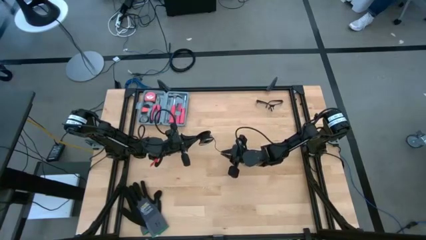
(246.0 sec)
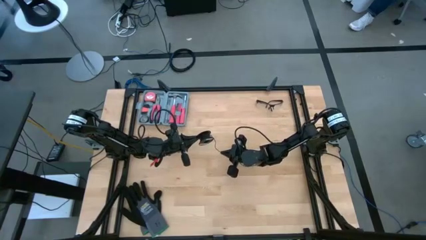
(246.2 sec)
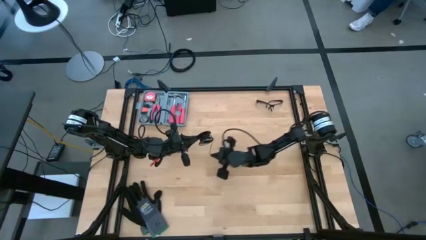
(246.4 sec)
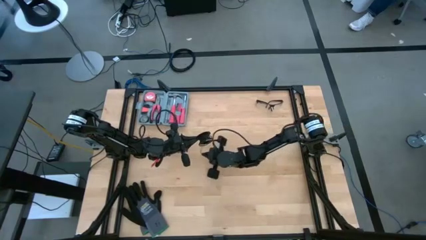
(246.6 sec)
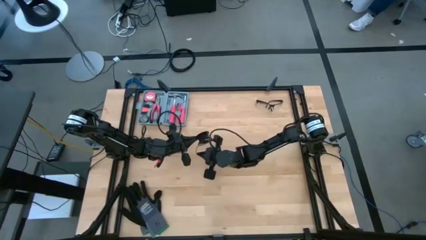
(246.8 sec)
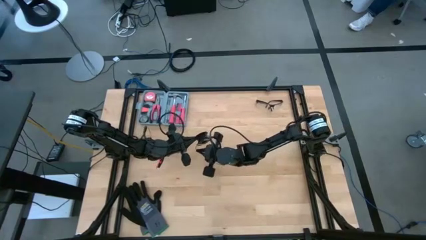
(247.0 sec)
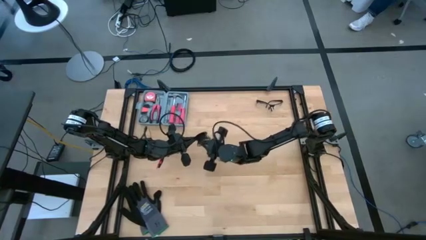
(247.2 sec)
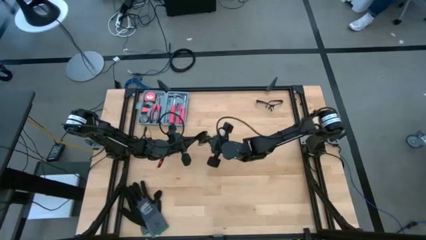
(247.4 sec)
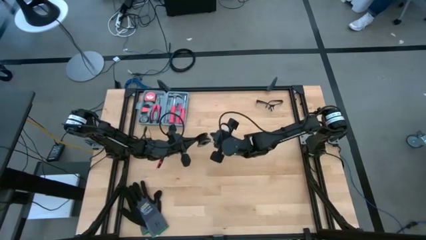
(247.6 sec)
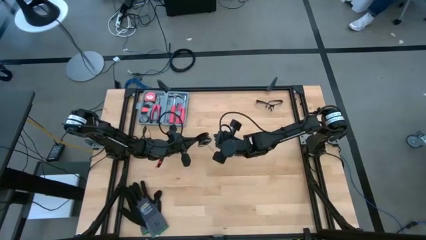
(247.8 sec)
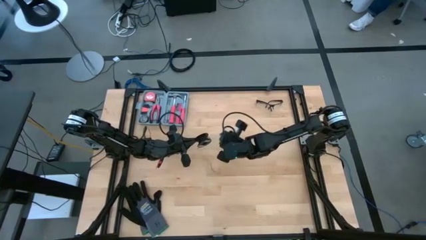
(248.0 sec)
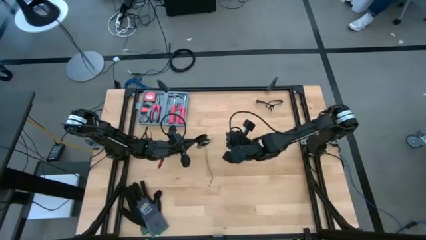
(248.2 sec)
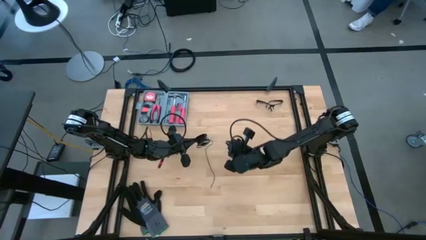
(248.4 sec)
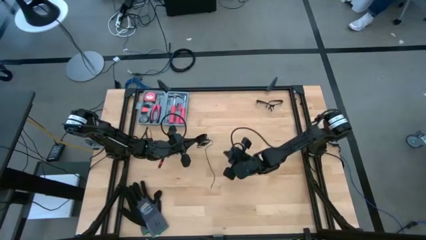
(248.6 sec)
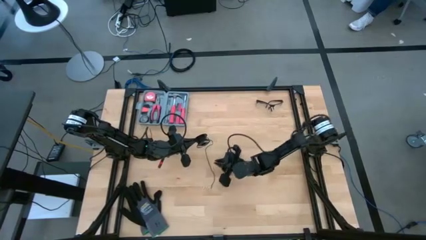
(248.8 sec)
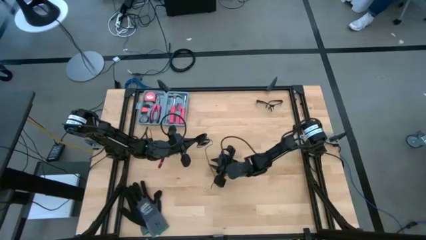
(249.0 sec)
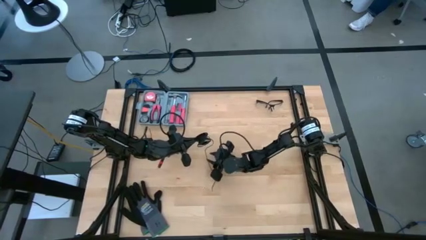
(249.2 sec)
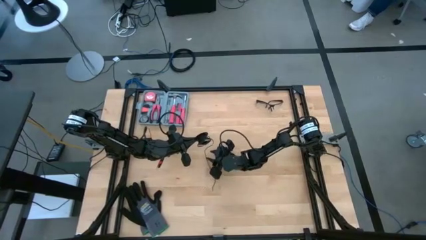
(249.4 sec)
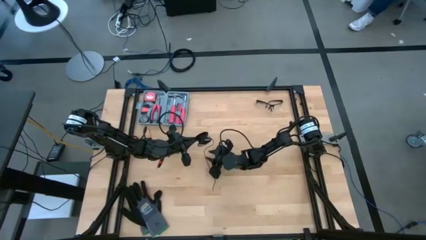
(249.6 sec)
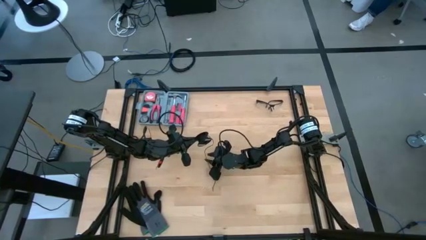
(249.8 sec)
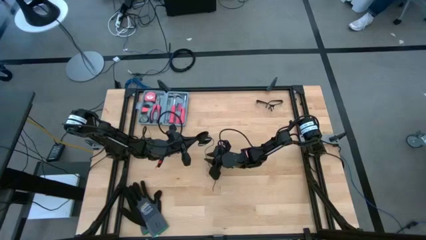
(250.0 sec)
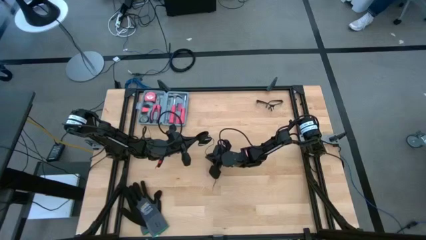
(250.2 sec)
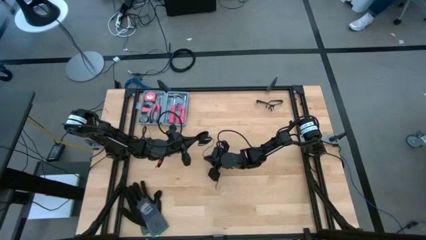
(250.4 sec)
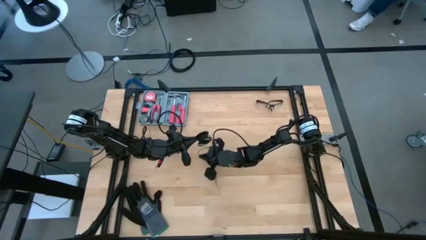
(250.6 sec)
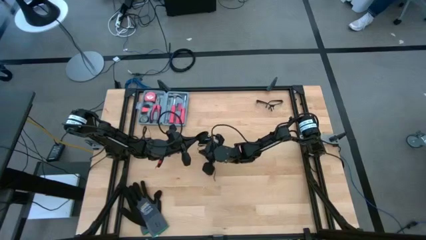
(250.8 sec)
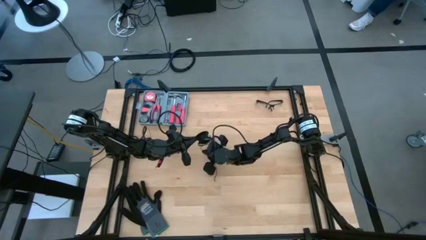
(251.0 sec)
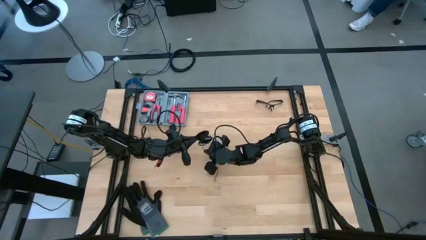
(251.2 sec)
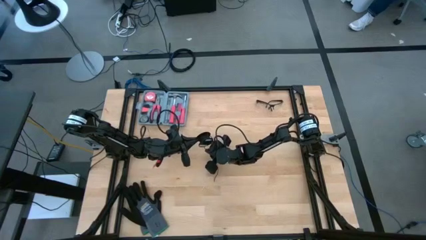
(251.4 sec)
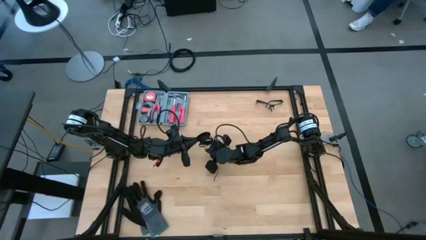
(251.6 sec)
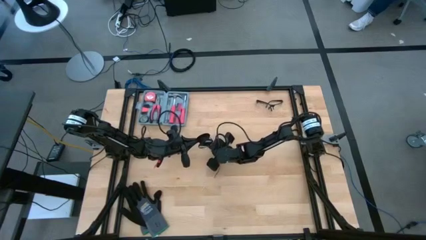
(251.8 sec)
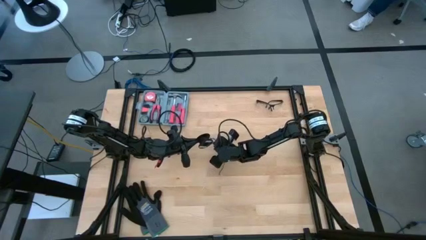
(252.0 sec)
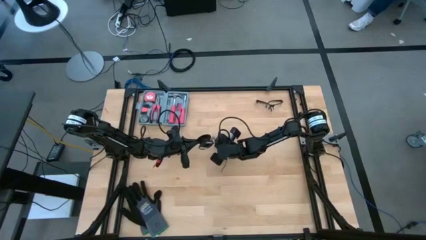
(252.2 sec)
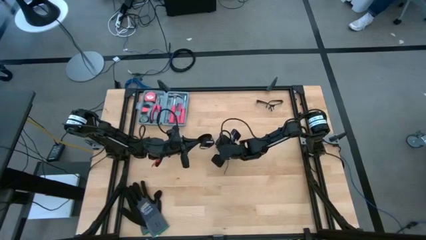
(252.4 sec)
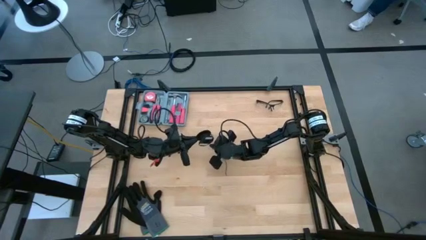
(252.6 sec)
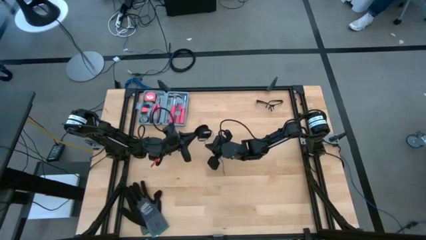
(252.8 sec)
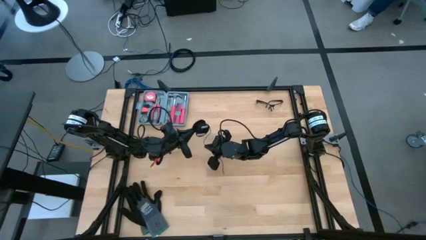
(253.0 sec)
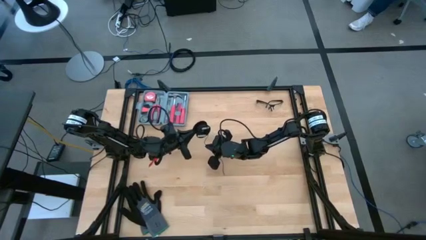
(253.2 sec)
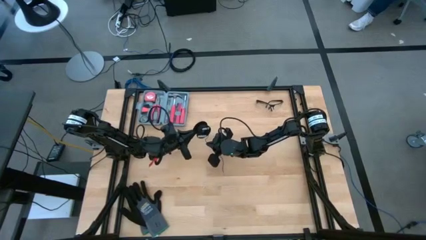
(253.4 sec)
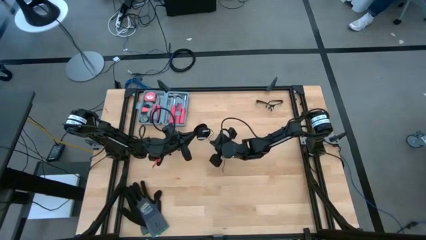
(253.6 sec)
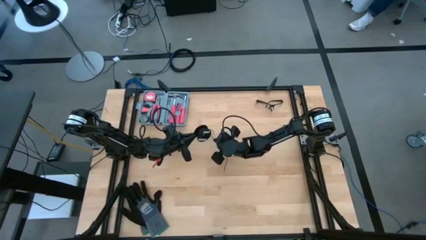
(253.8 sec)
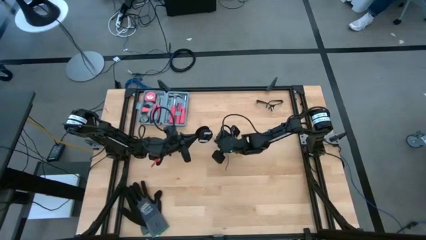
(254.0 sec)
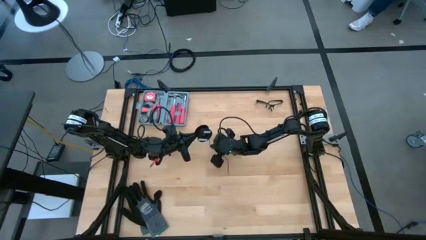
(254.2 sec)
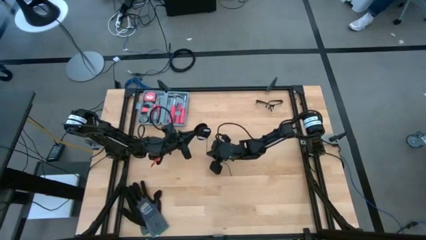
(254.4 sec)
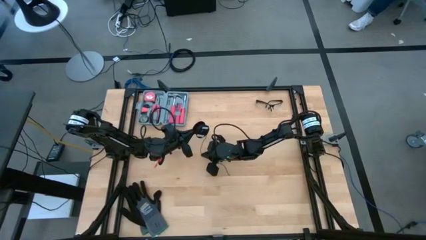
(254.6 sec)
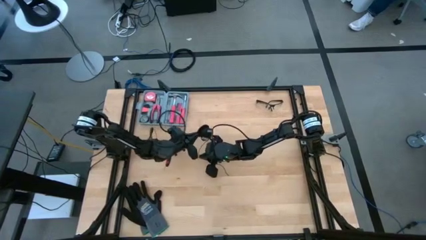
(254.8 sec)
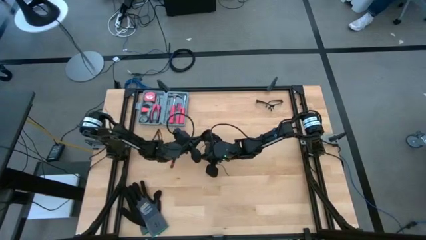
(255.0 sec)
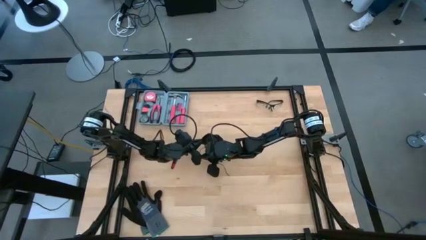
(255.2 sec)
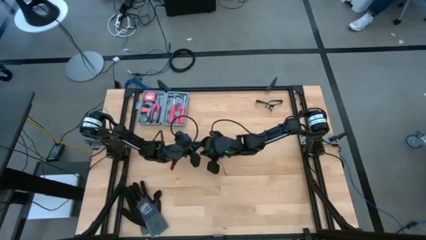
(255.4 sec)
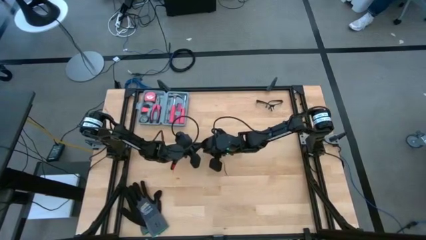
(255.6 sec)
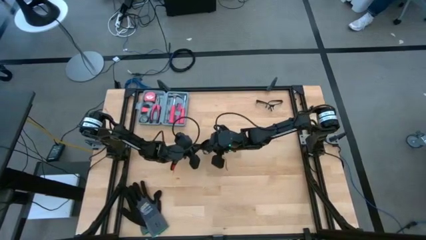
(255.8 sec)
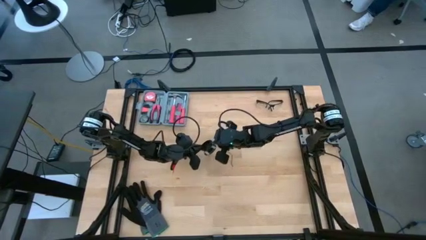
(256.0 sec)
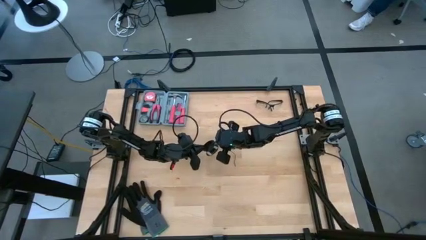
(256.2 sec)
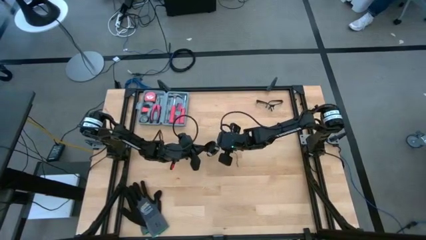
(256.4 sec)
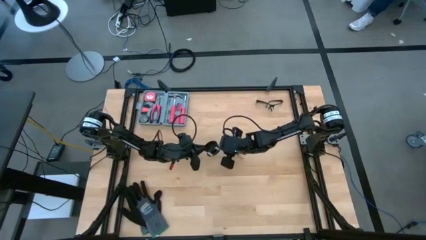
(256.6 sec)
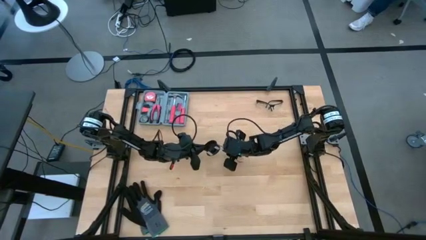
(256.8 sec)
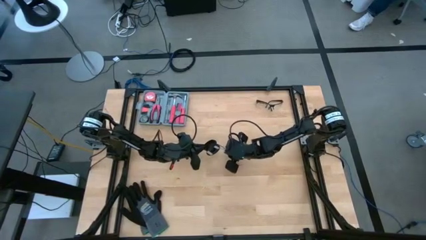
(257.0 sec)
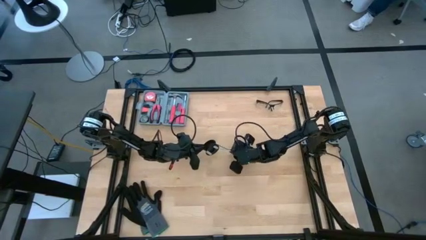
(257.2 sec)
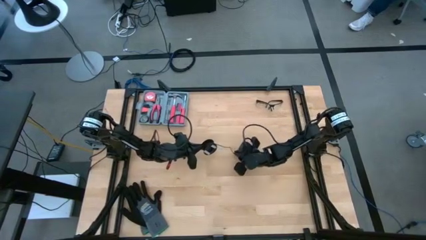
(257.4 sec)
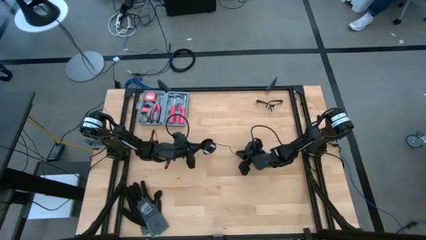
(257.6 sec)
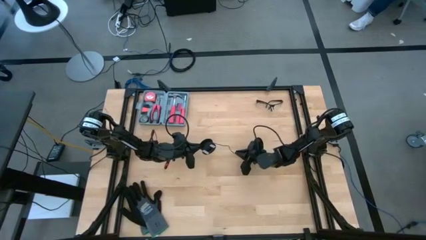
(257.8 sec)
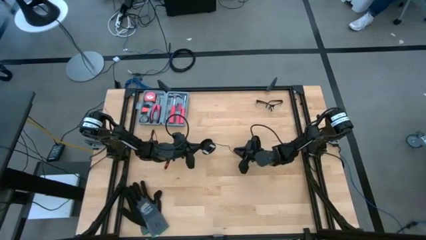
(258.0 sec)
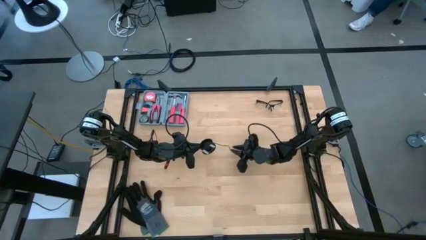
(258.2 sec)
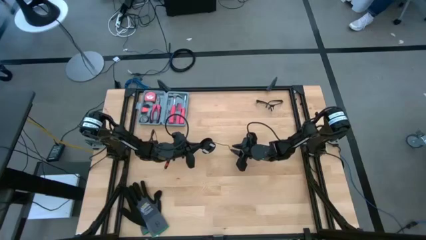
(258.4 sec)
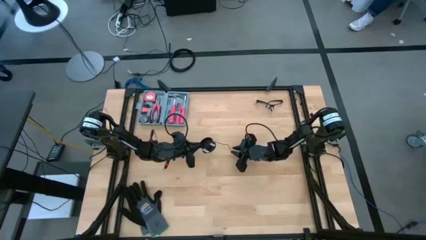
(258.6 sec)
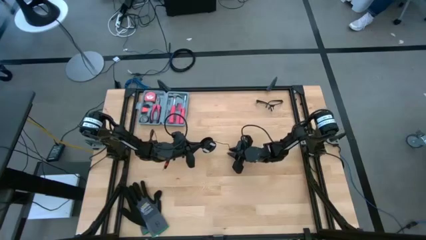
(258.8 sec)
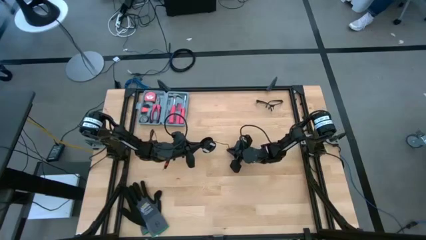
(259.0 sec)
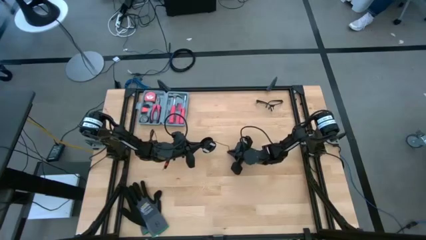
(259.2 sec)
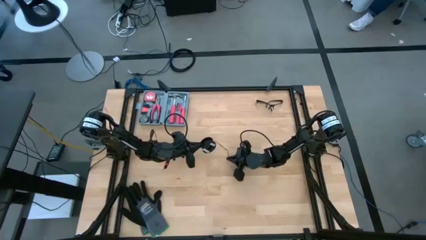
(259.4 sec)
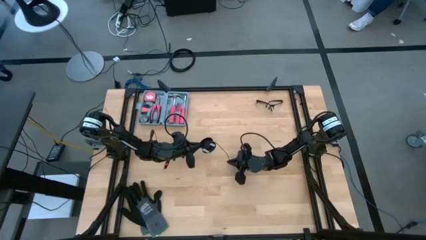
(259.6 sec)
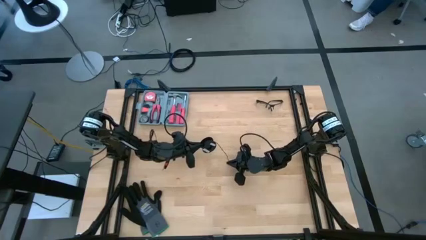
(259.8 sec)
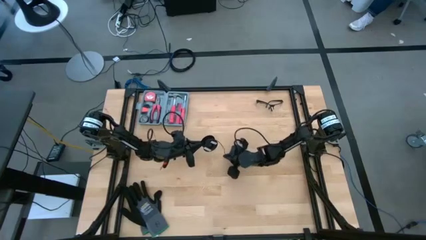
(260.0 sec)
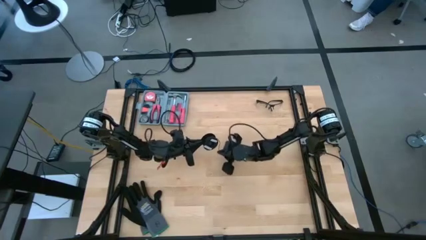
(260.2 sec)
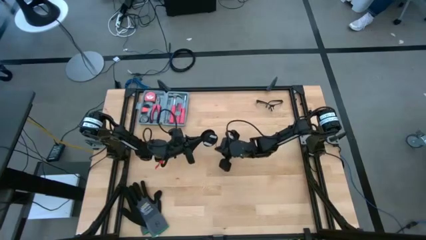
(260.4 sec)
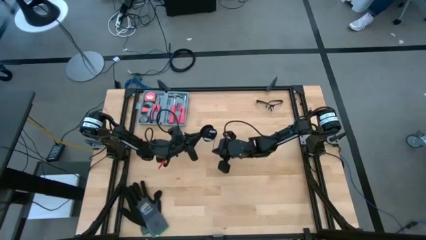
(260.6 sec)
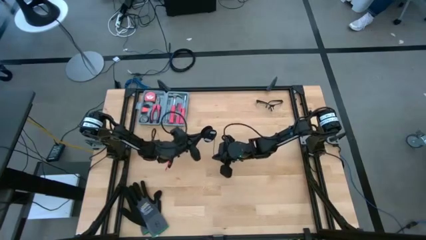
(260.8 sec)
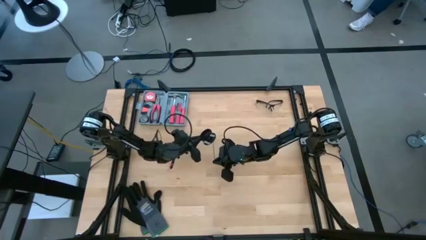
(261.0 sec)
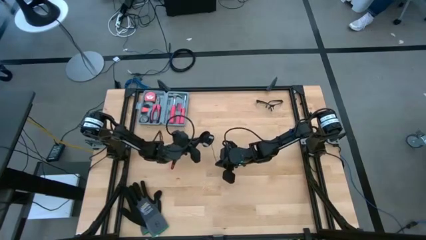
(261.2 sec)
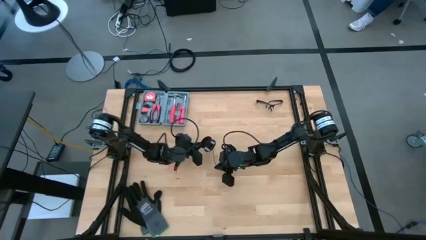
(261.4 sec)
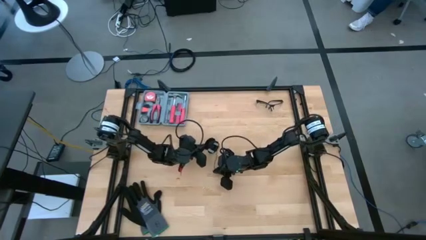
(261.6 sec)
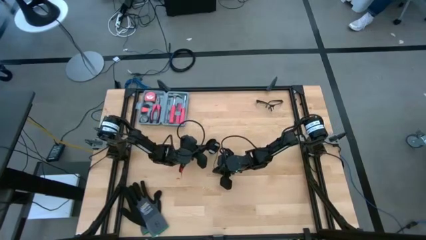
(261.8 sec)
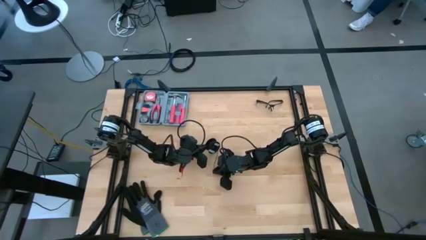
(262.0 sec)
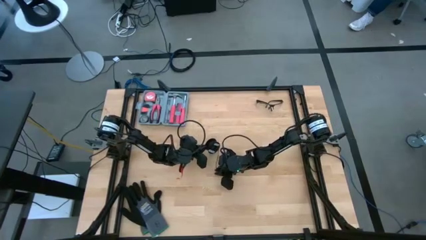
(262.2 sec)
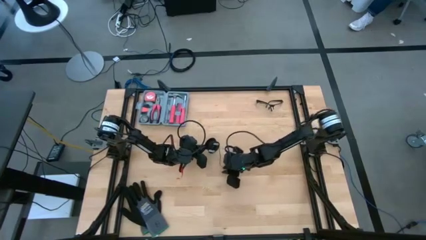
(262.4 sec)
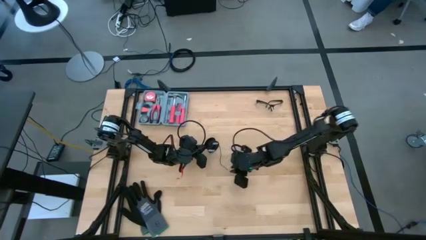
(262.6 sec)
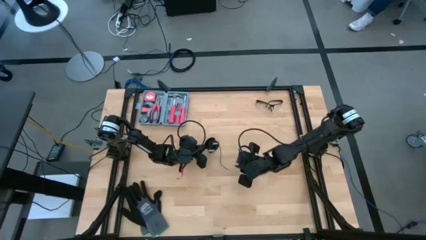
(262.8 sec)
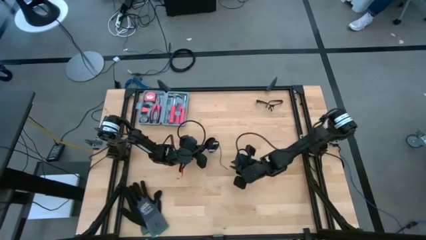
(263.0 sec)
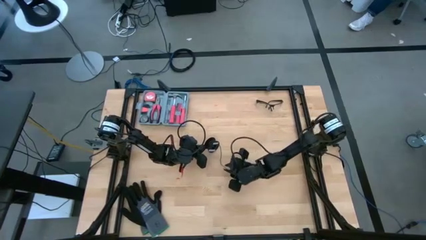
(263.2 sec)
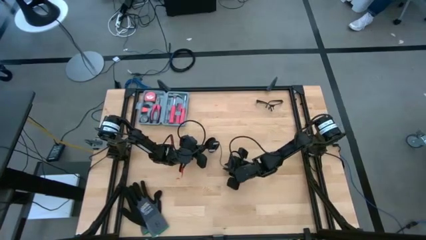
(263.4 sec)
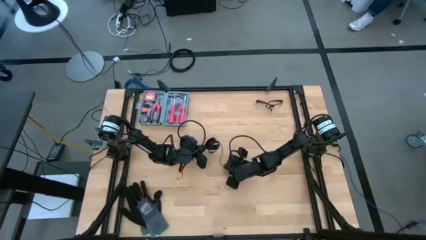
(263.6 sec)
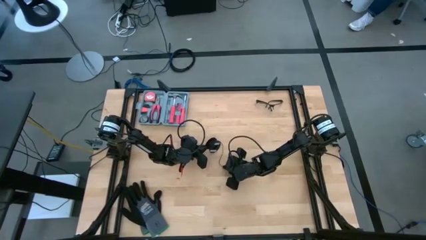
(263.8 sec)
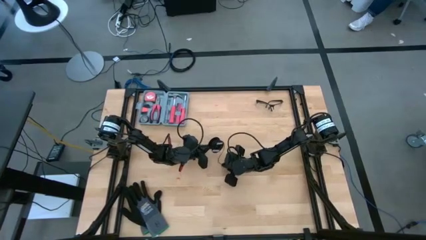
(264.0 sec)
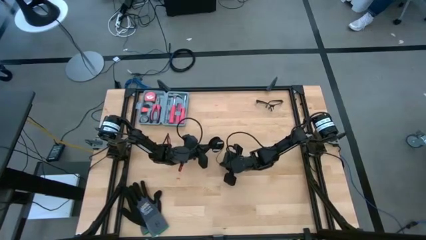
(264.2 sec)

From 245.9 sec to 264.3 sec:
Task: Coil cords
Coil the black wire on the black spool
